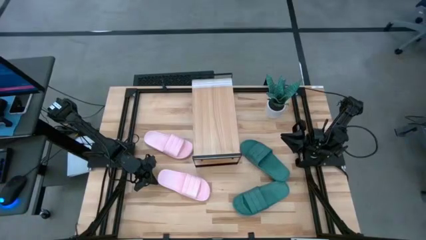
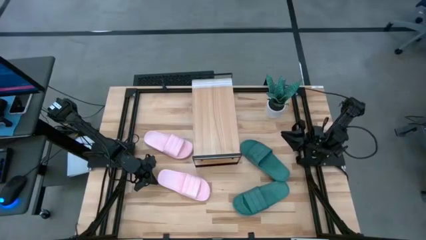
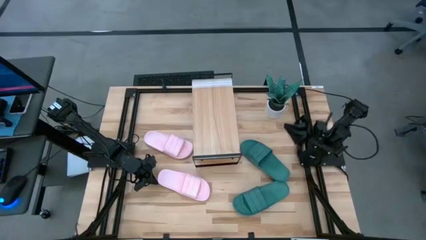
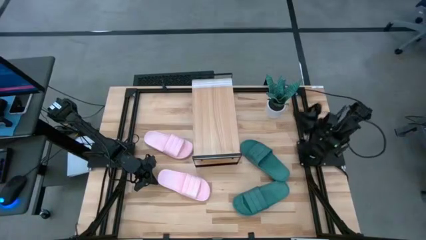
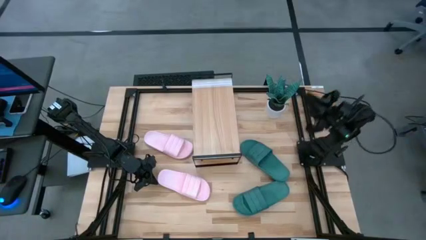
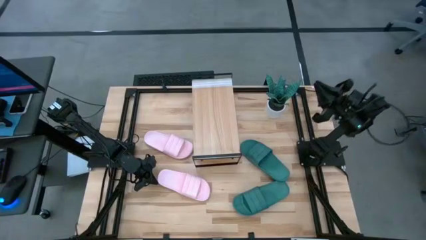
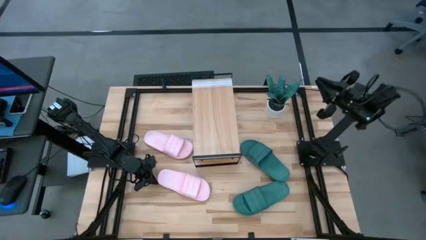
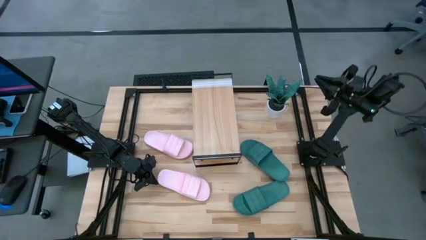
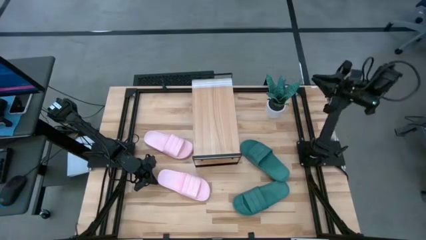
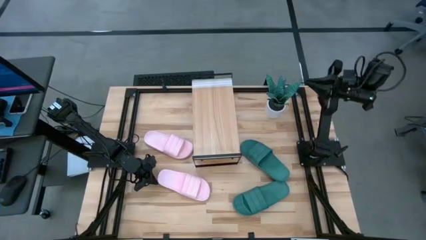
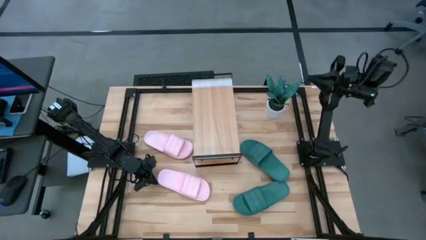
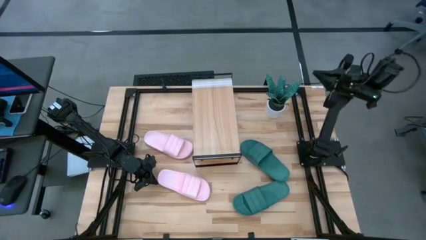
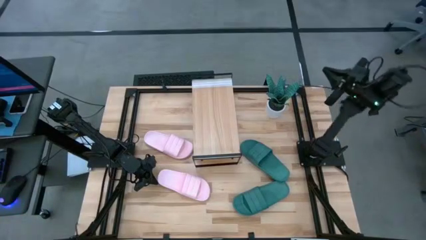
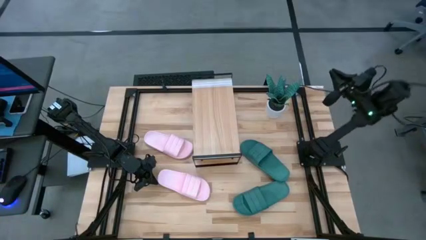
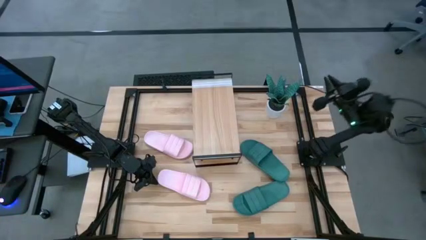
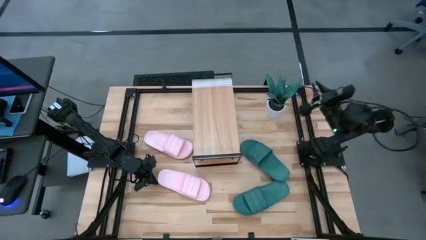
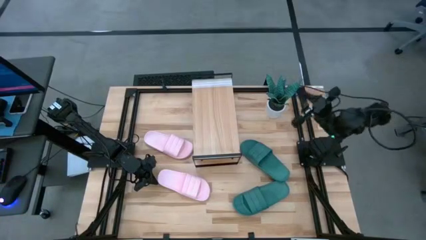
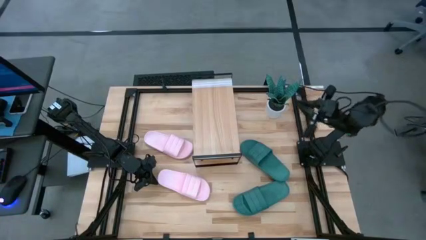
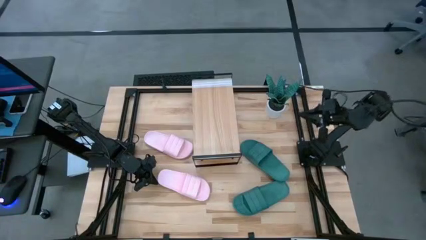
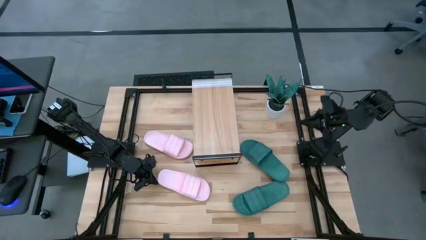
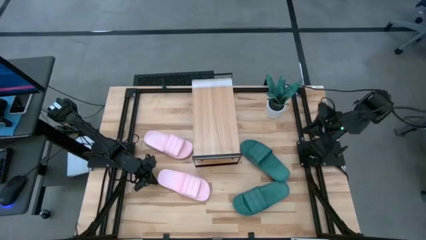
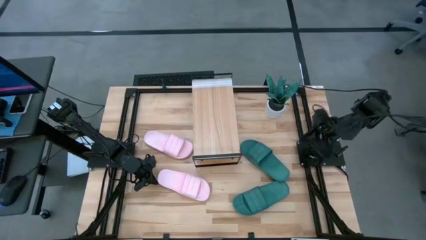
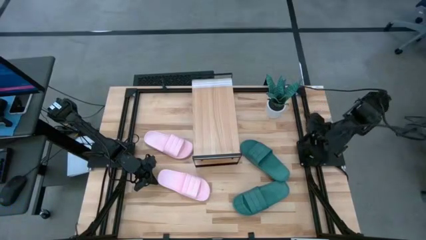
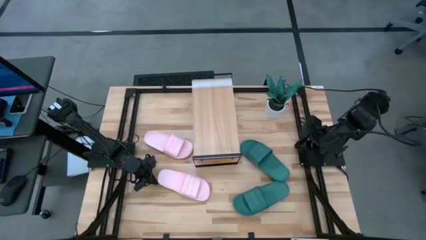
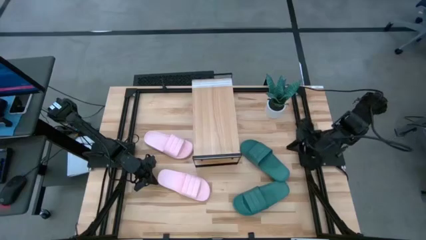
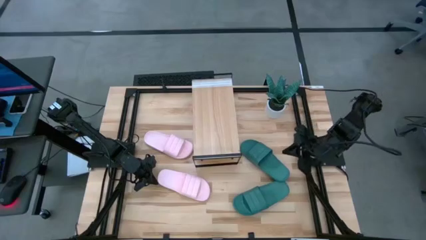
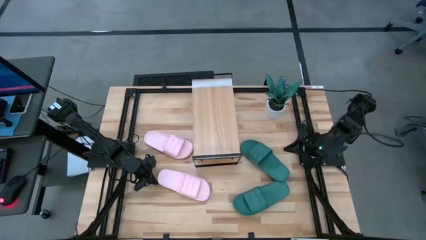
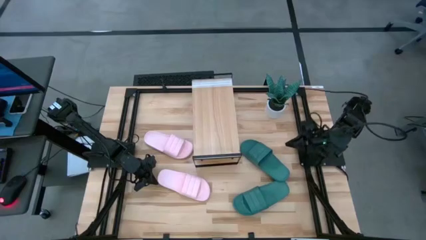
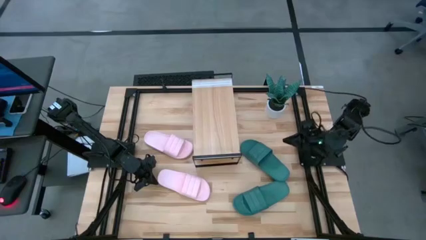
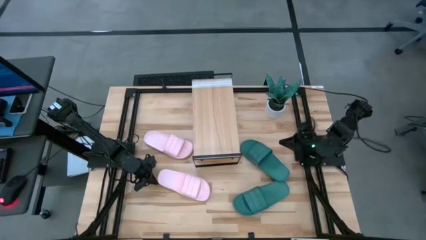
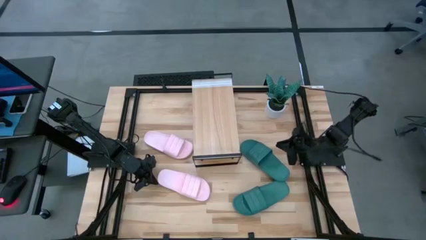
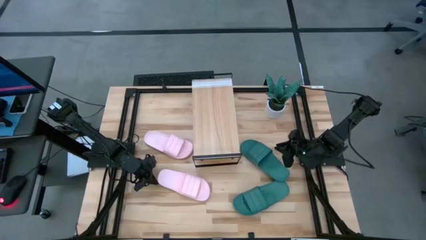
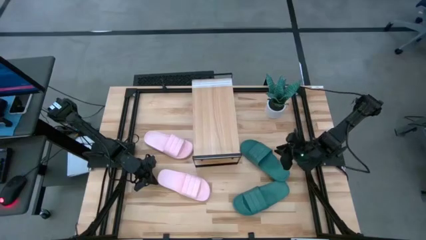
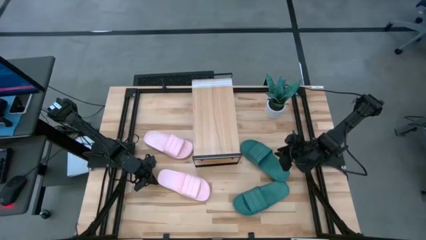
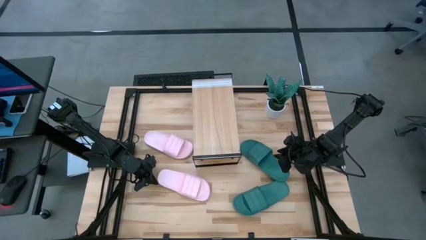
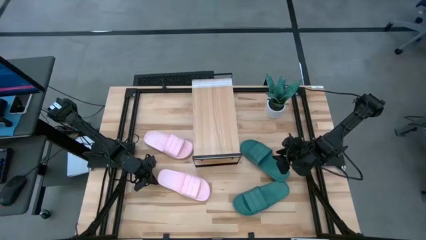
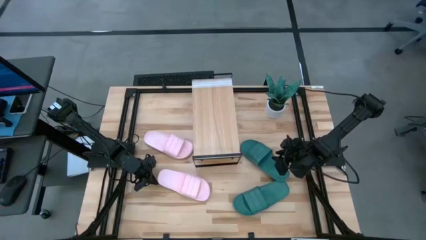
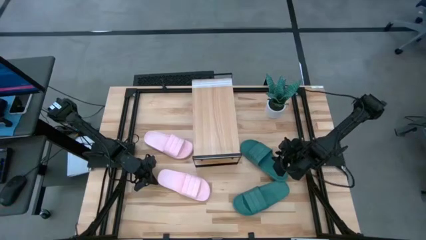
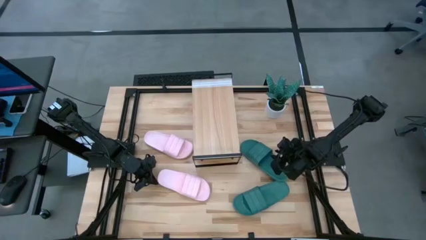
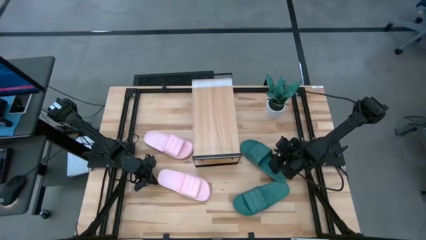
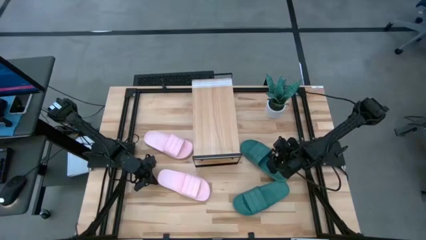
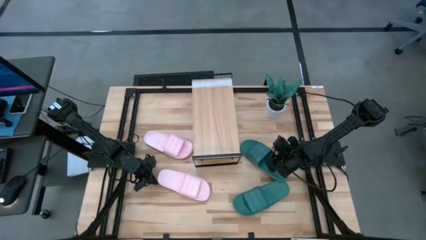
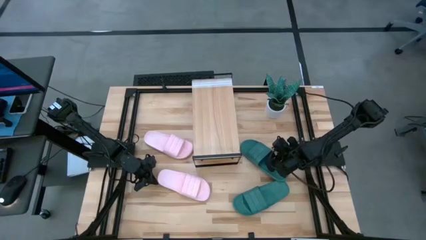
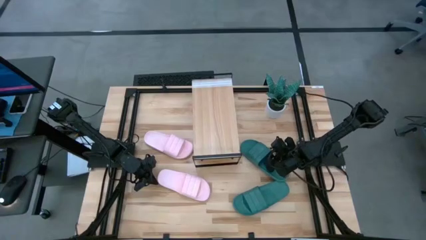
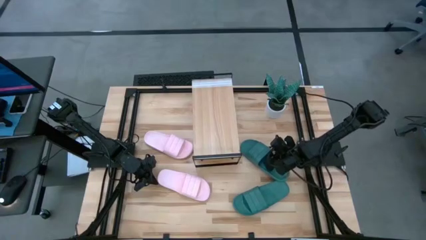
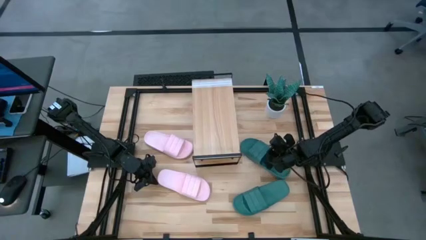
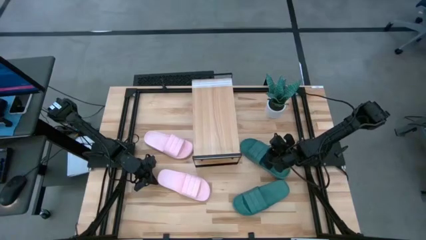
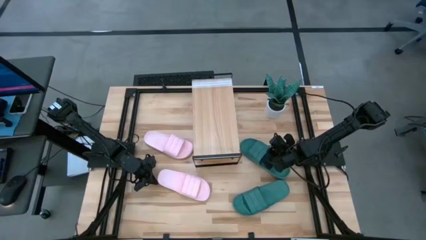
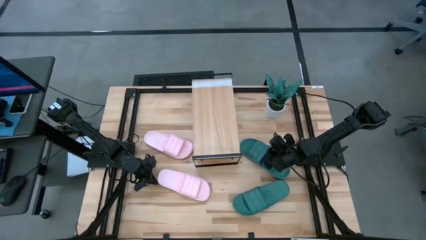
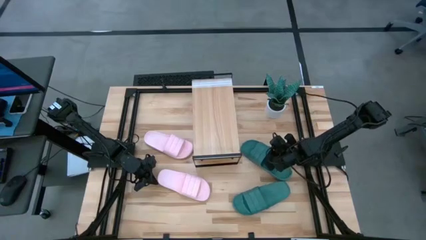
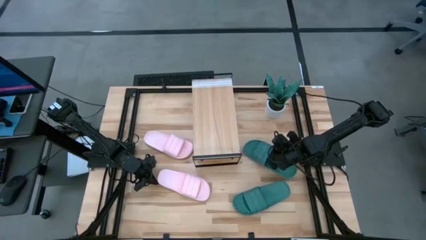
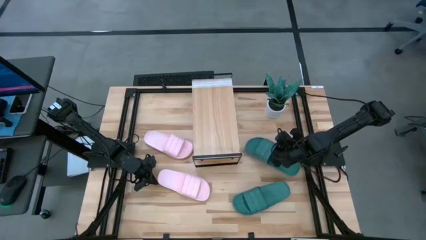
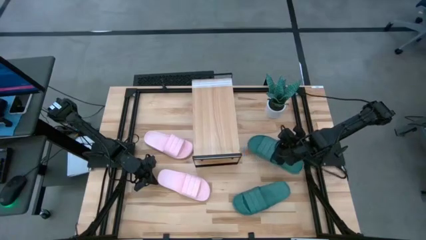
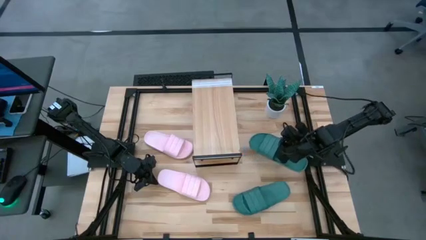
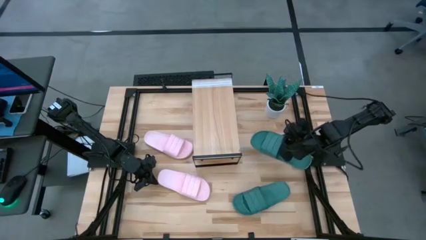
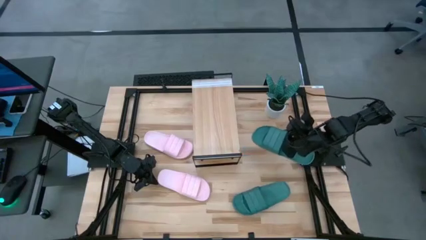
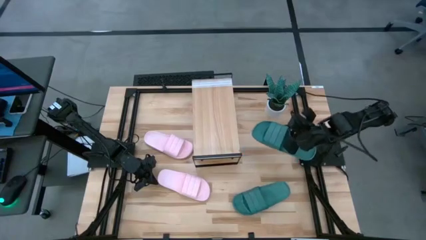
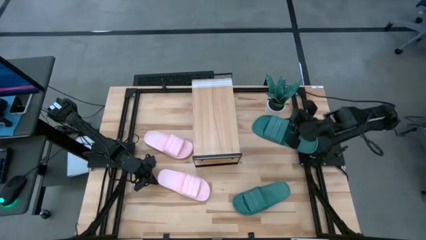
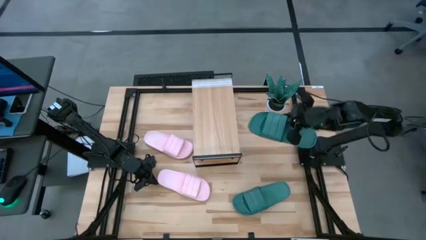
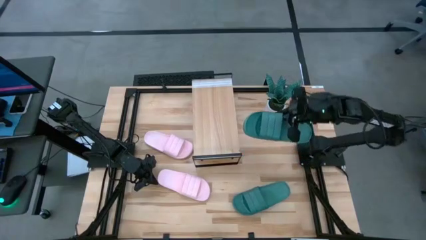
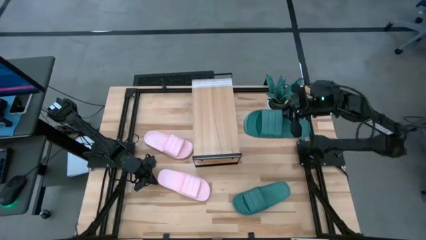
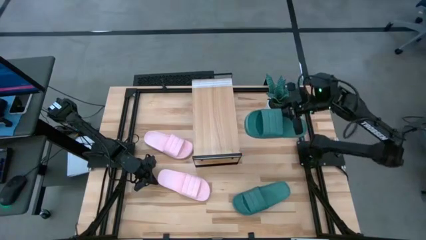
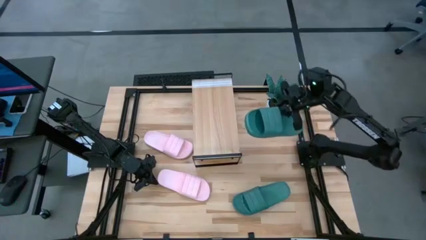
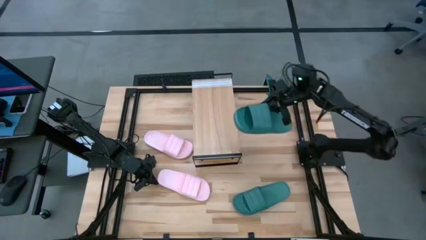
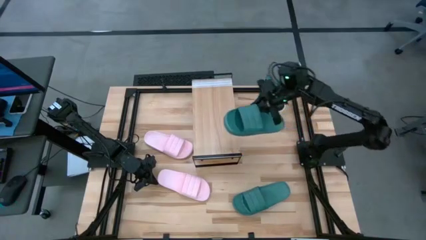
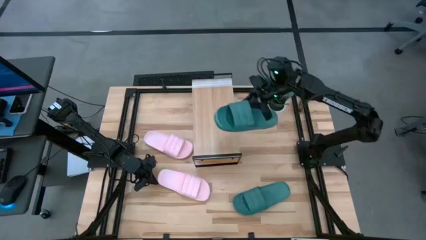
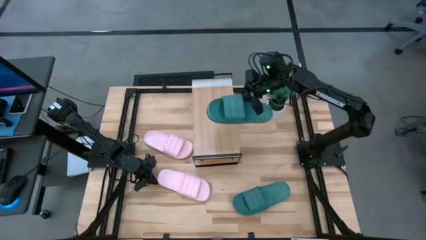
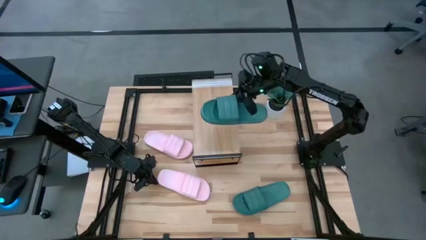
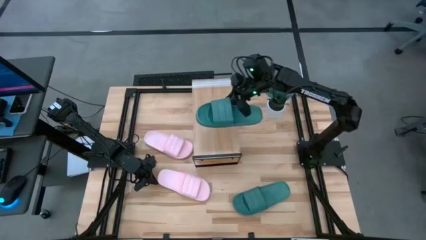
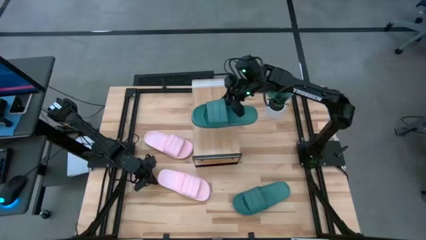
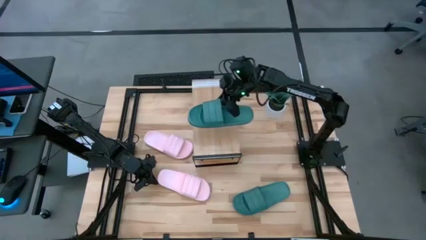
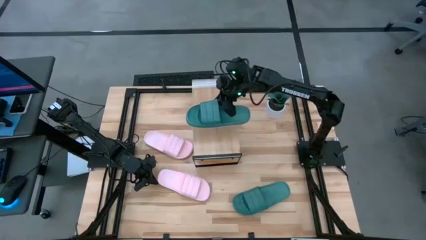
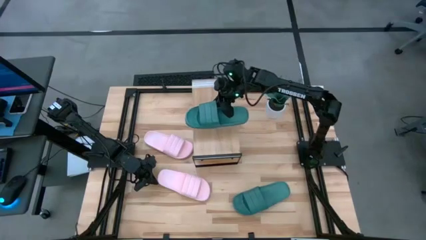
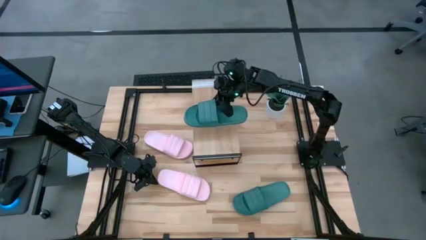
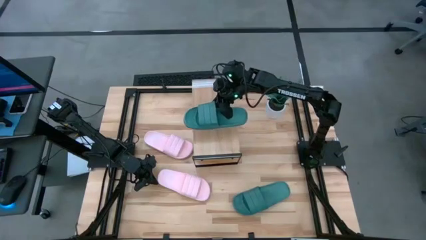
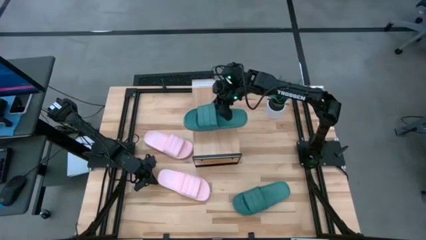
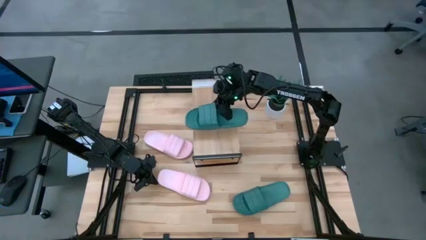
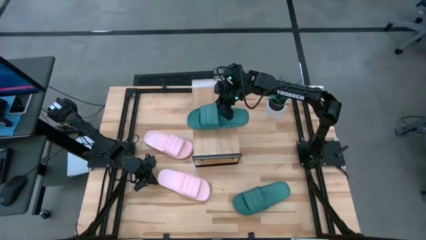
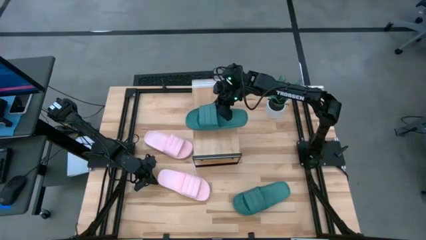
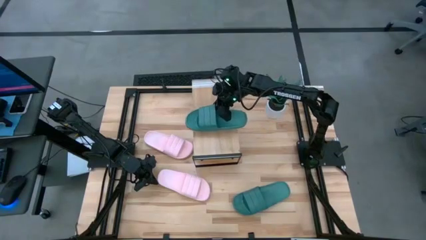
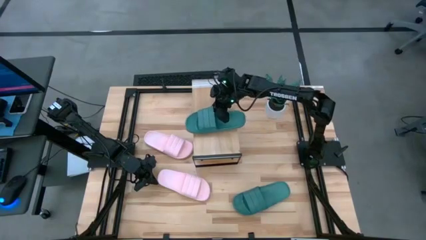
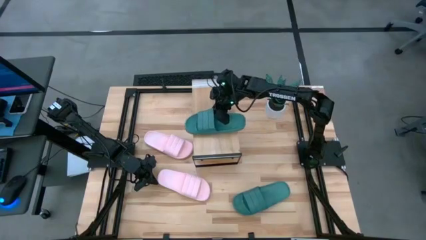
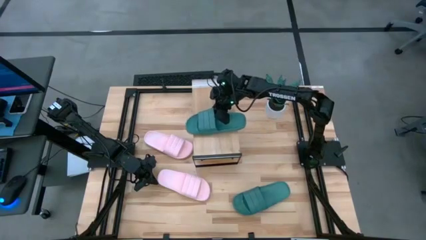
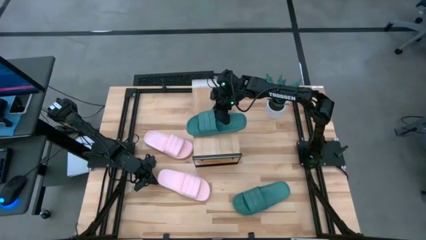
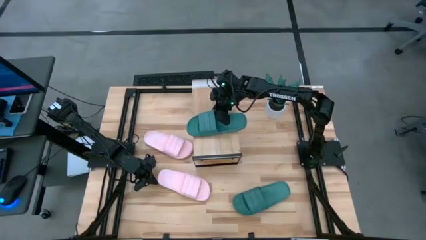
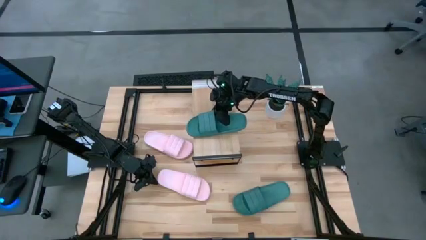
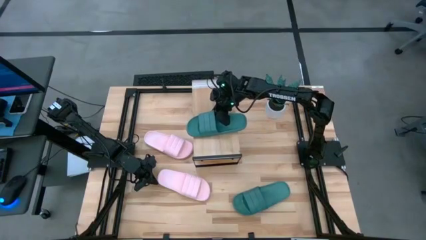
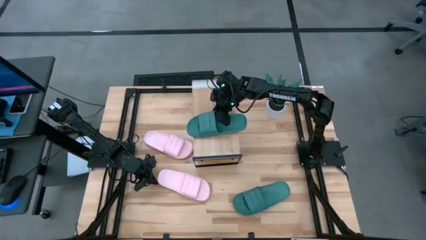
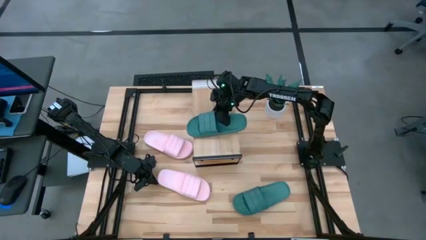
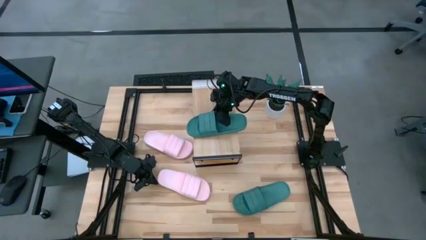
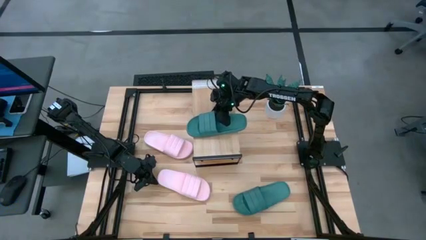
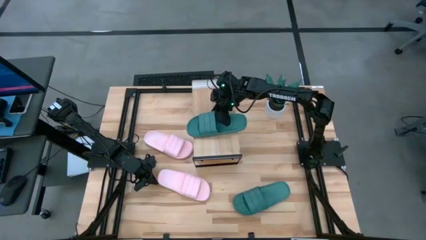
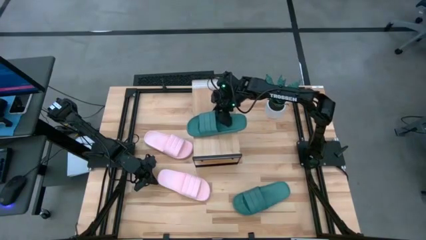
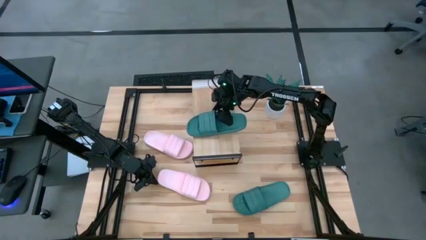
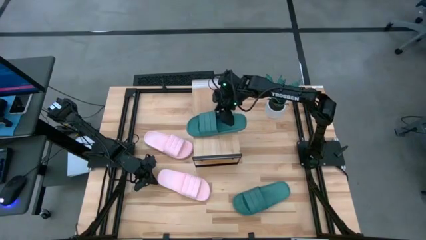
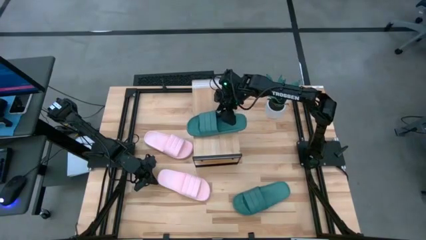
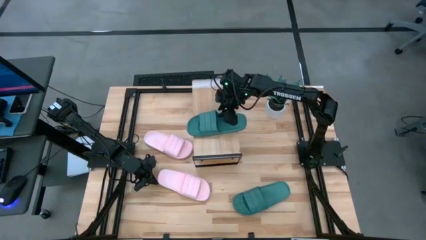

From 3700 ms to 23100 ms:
Task: Pick and place slides into the shelf
Put the top green slide on the shelf
